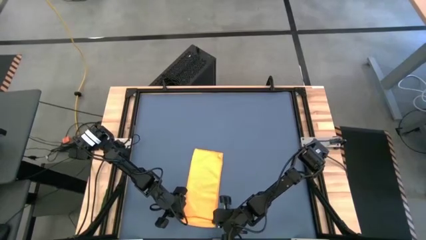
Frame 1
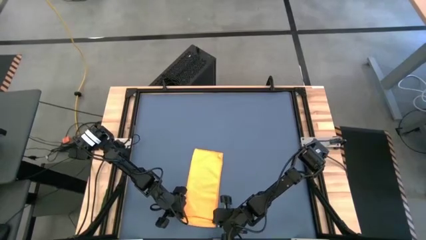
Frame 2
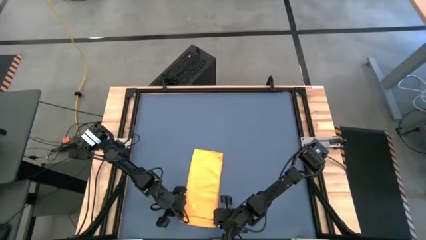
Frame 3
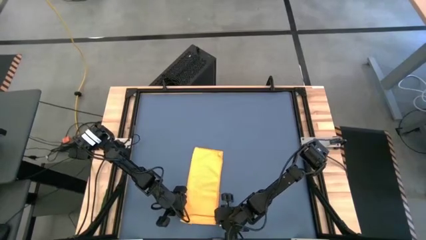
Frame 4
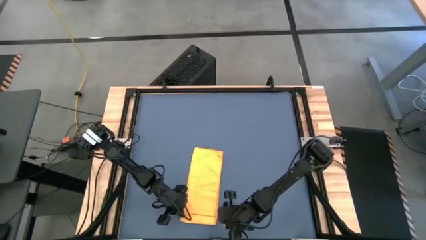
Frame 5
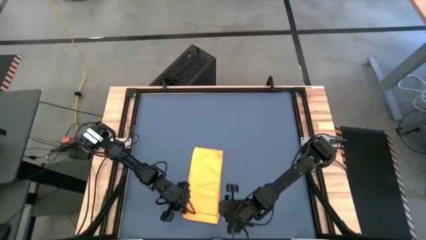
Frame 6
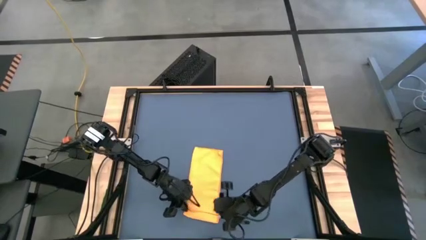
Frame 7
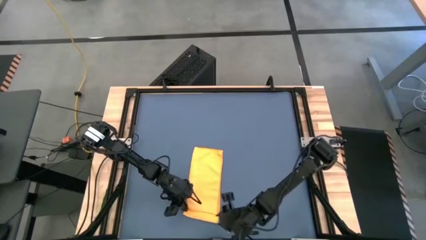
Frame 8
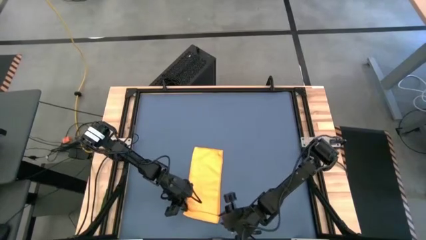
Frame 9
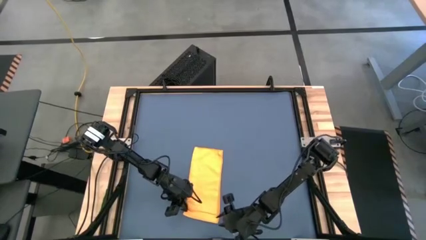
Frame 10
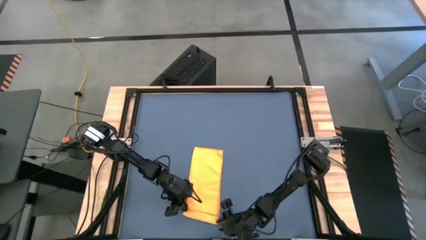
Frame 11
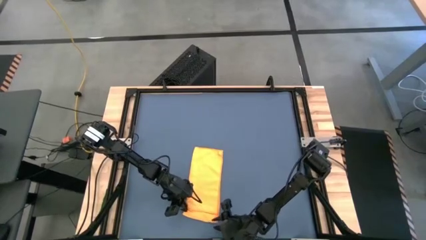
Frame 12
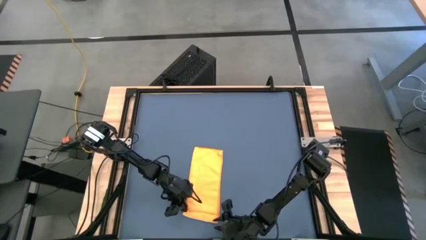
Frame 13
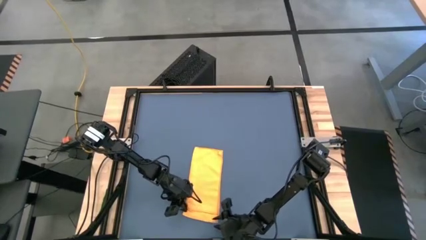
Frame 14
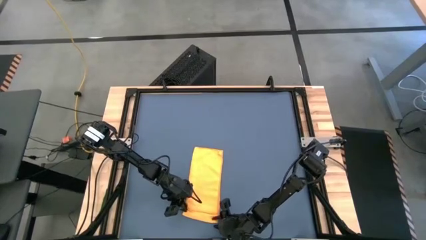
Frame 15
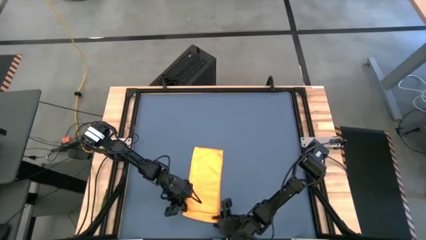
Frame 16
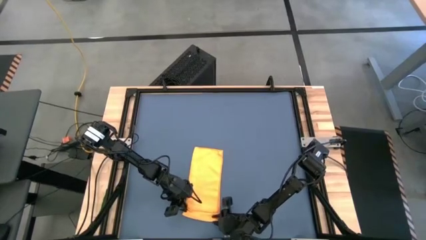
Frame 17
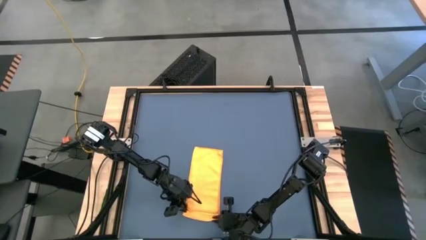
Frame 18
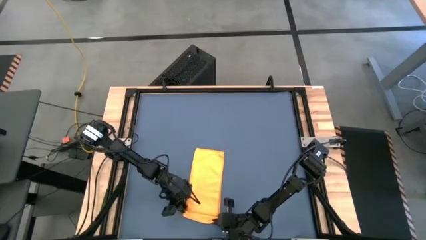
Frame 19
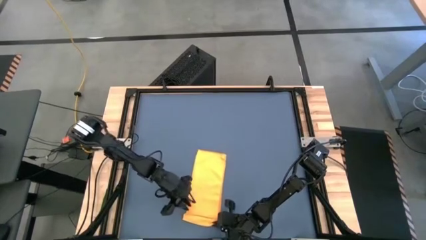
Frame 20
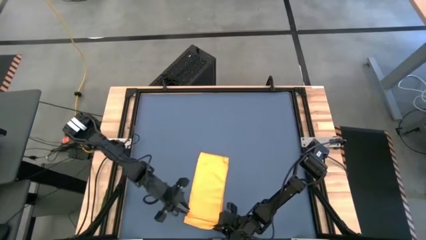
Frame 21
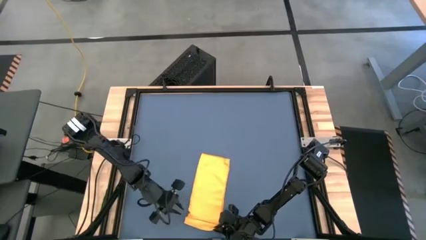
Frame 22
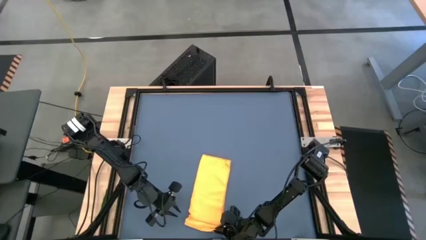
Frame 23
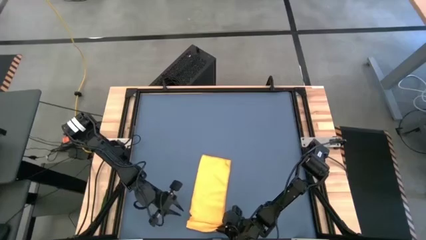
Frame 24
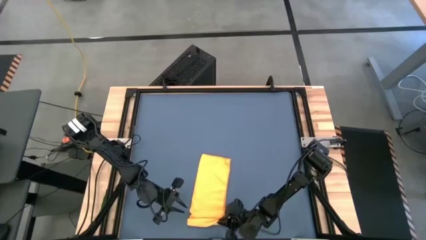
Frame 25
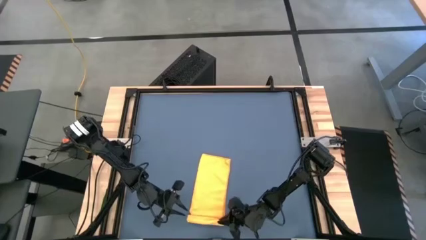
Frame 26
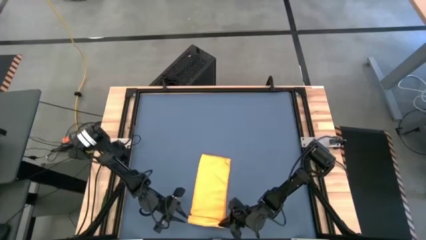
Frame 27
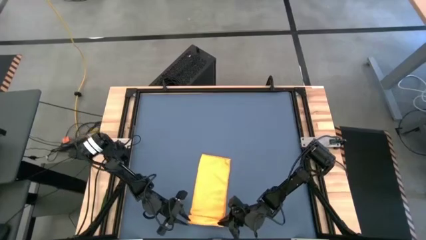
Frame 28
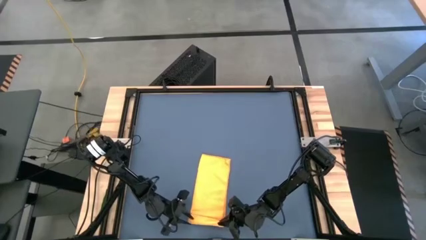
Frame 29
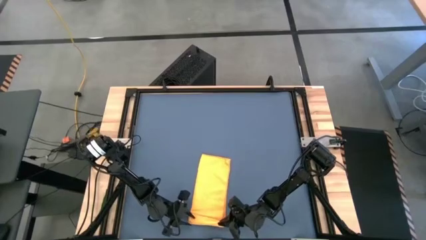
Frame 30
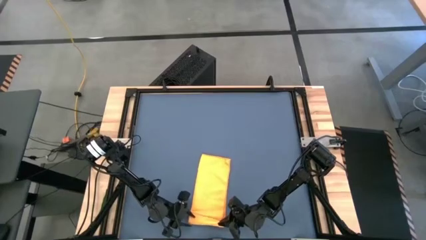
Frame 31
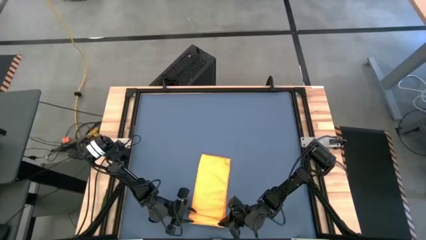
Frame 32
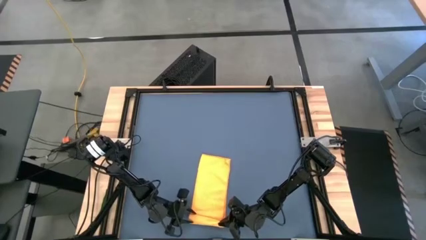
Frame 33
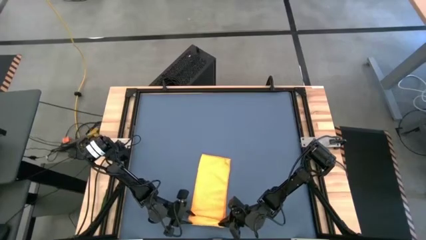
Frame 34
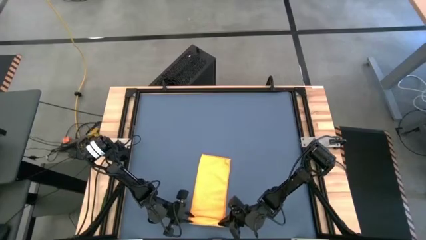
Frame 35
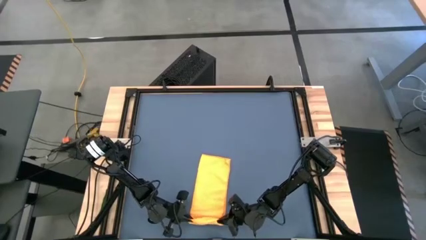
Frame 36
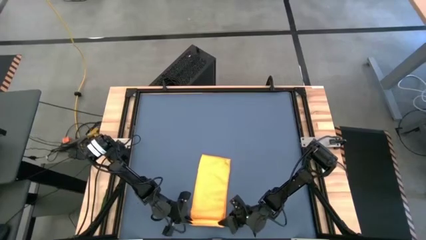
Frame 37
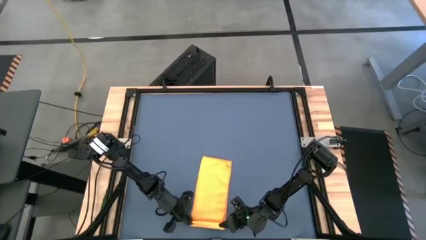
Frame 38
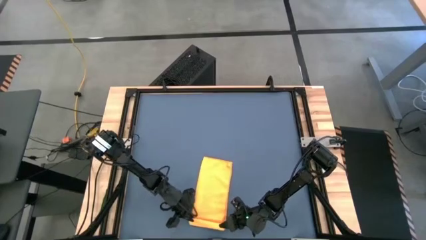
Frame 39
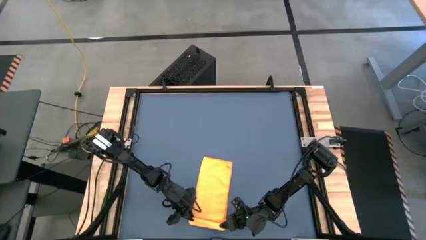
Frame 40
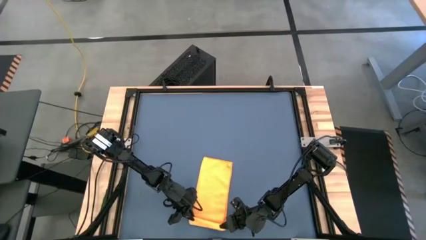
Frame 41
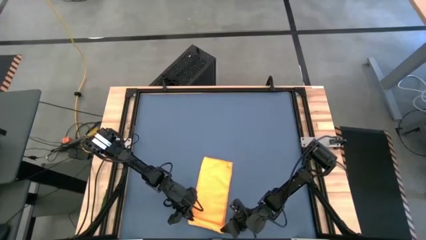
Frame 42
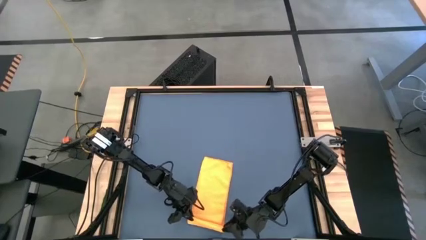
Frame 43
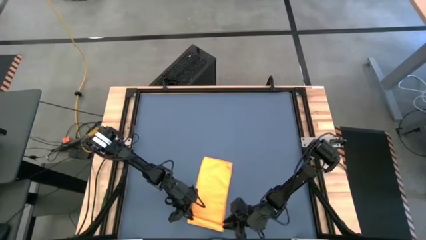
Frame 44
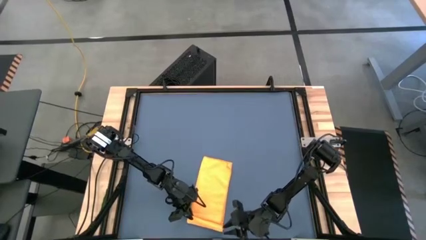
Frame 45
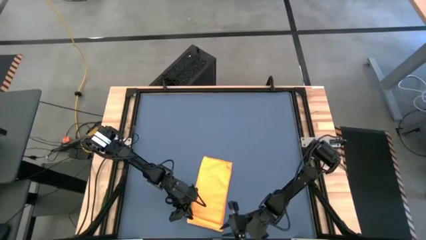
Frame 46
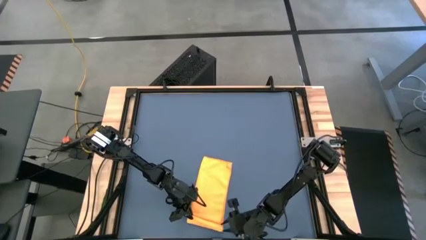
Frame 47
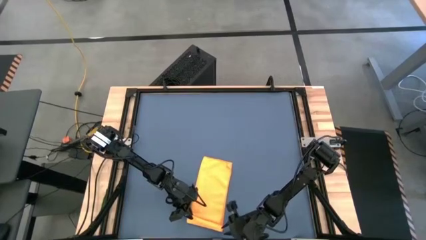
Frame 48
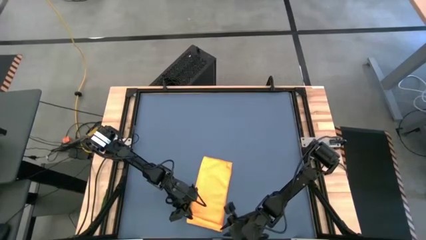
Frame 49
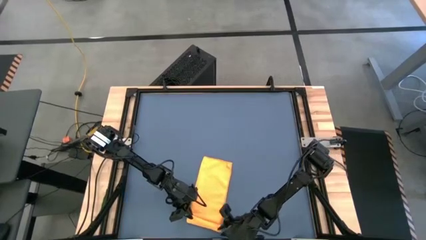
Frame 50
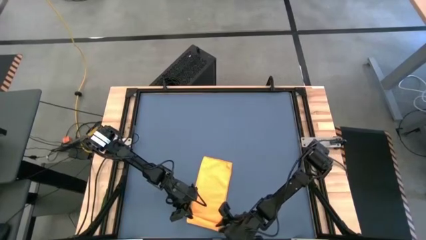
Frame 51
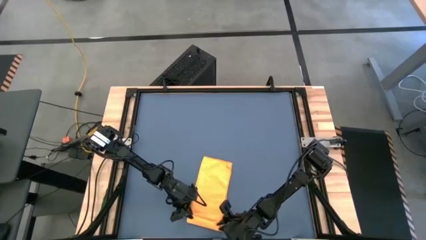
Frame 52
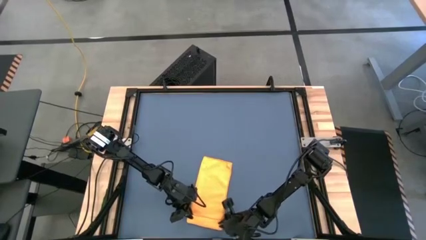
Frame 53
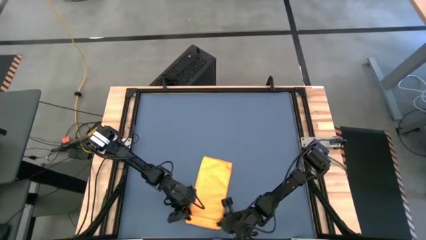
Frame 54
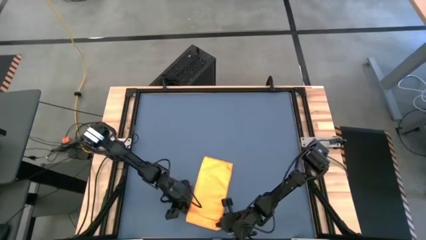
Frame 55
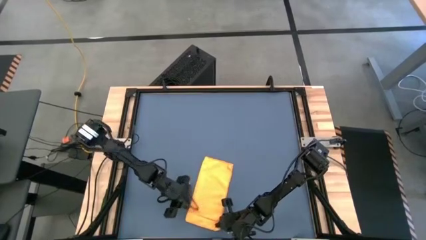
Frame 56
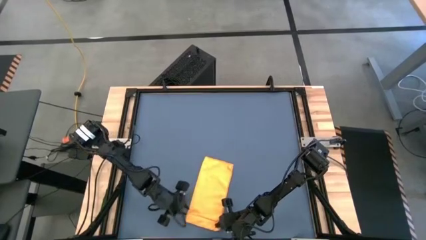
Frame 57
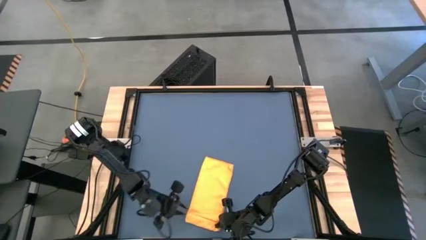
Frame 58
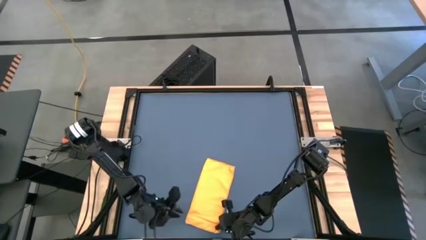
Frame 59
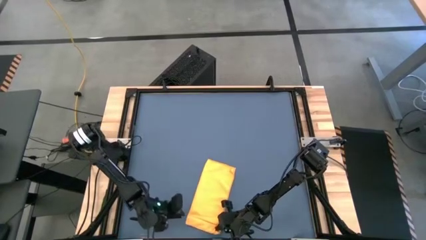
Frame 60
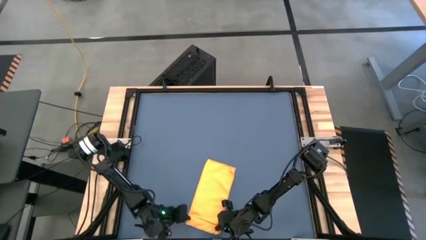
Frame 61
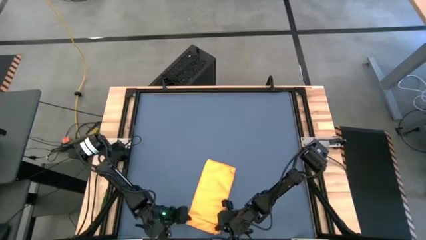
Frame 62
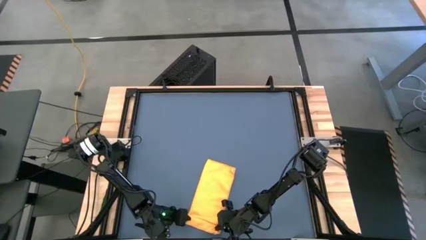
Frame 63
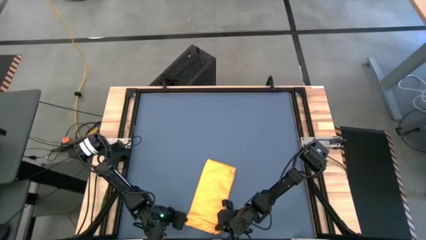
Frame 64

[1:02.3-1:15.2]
Task: Roll towel
Roll the yellow towel

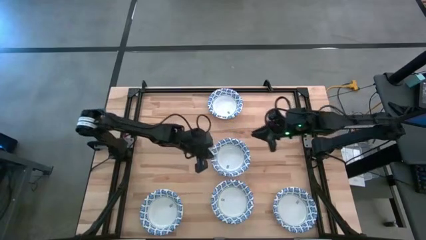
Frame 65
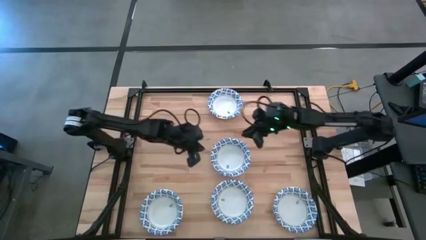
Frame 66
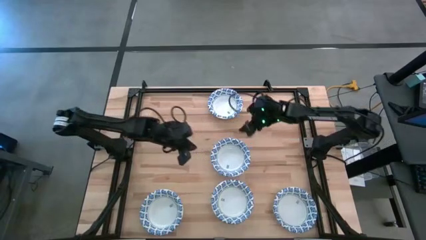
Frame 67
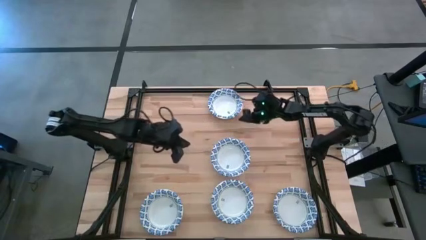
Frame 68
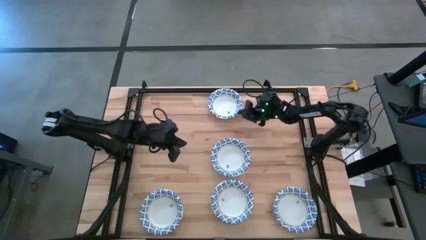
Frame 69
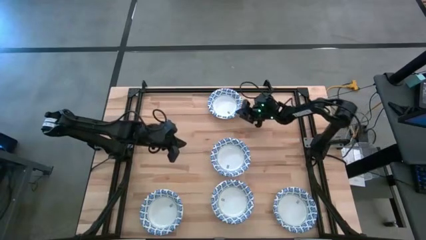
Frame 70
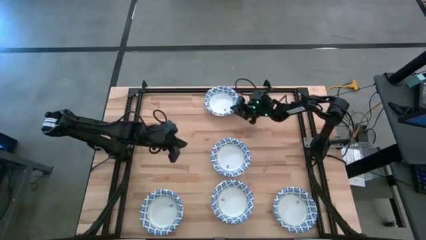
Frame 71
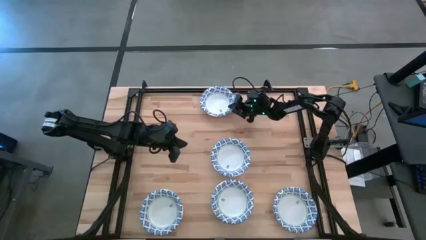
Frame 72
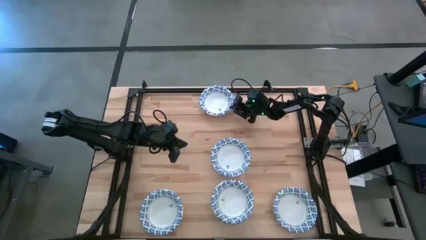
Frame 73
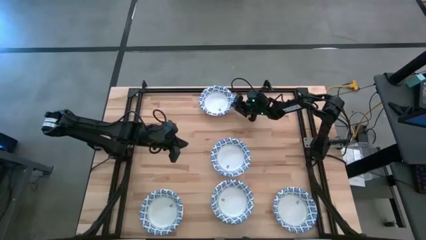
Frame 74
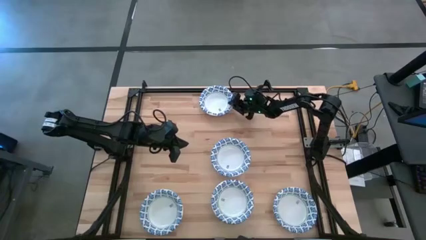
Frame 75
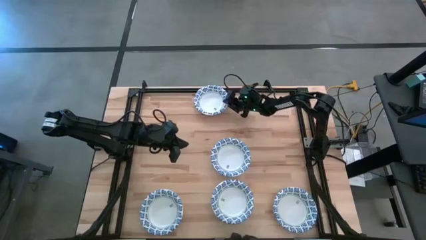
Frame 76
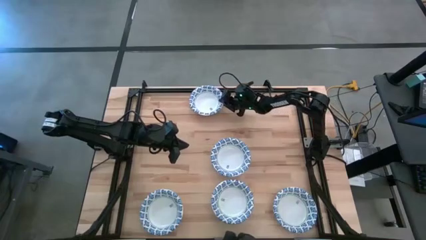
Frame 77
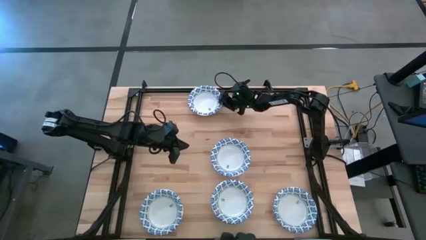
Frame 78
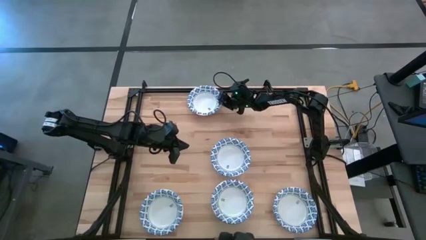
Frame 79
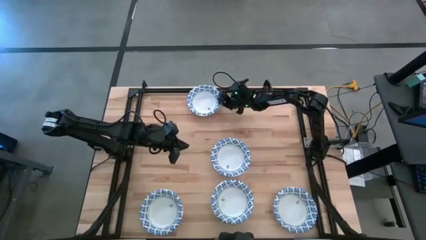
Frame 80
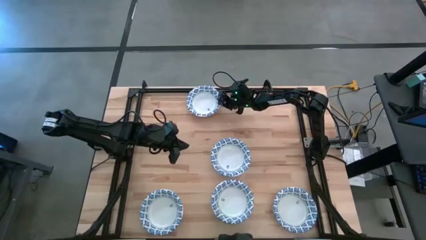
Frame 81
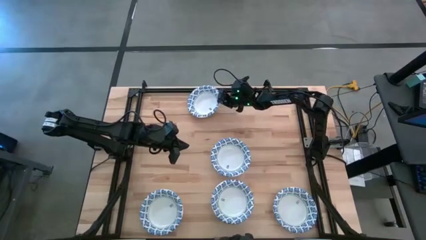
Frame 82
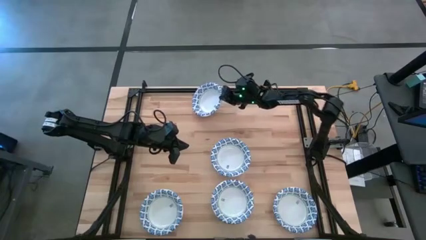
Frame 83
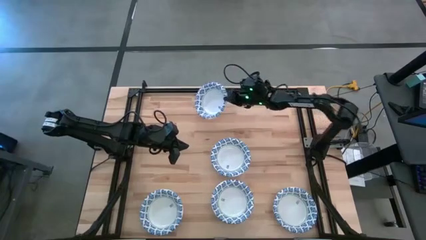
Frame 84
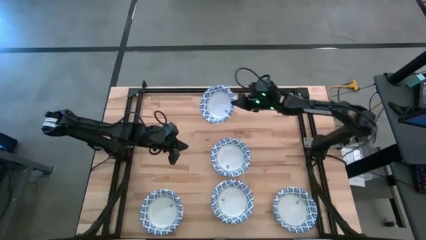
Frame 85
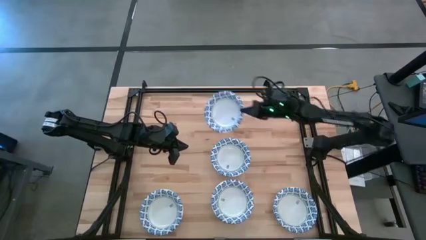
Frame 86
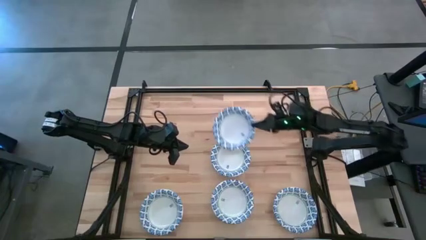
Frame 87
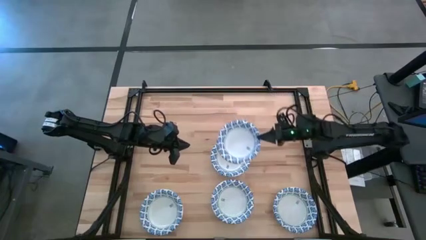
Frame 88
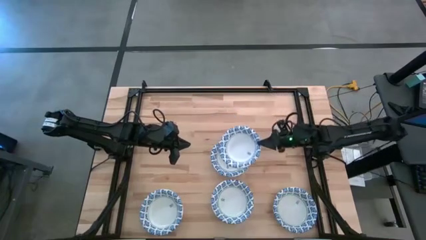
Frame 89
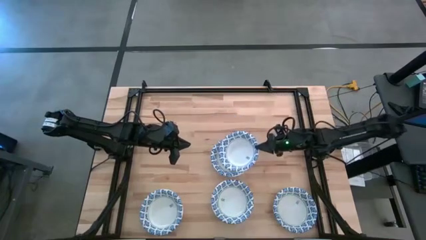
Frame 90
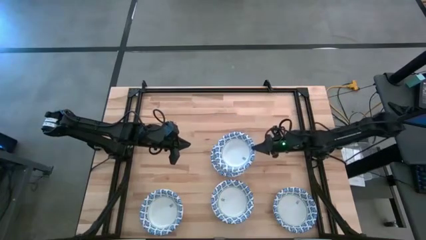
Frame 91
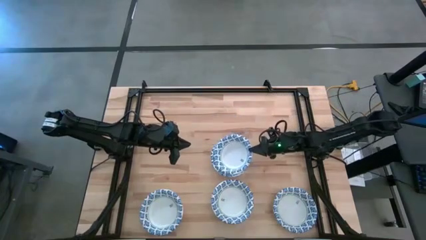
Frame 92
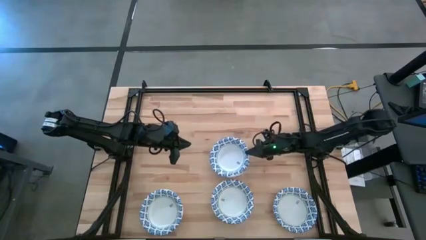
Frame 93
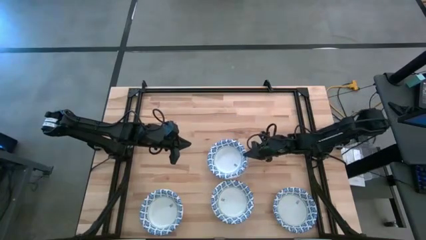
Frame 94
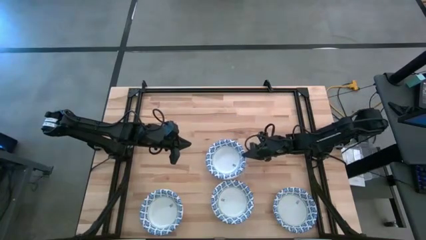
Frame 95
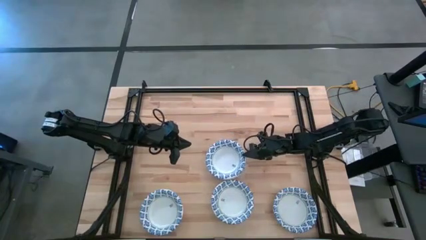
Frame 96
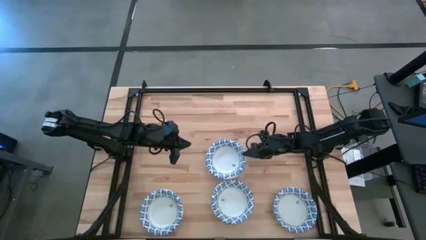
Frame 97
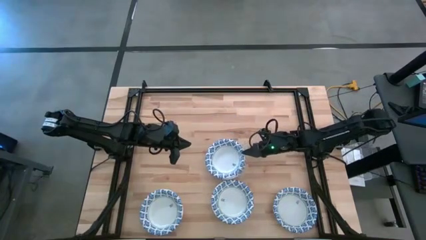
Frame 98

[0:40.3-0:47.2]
Task: Nest bowls inside each other
Stack the white patterned bowl on top of the center white patterned bowl
